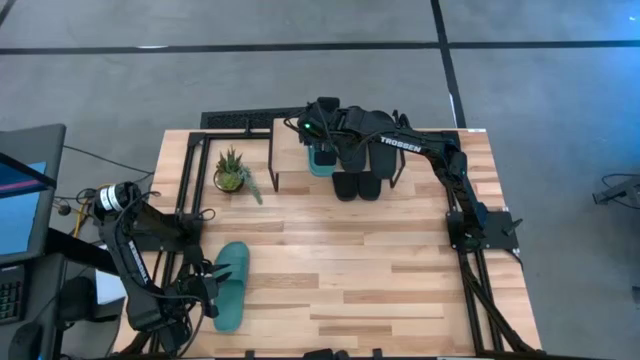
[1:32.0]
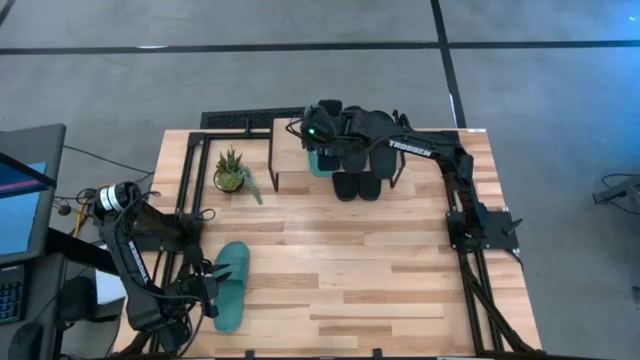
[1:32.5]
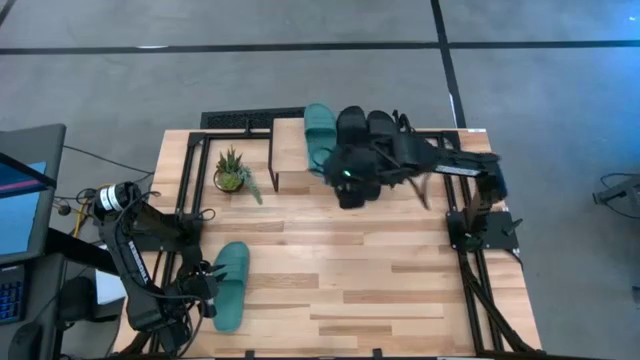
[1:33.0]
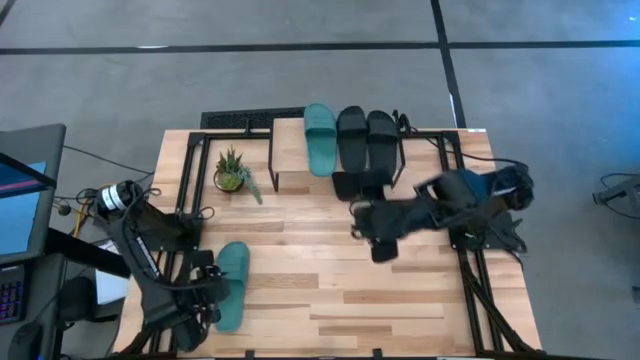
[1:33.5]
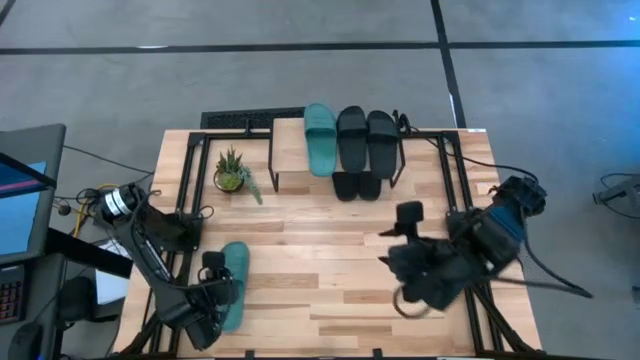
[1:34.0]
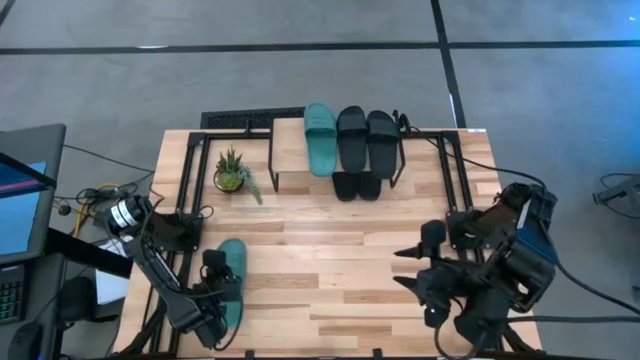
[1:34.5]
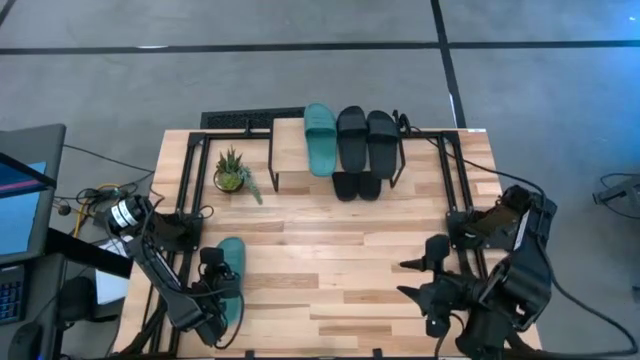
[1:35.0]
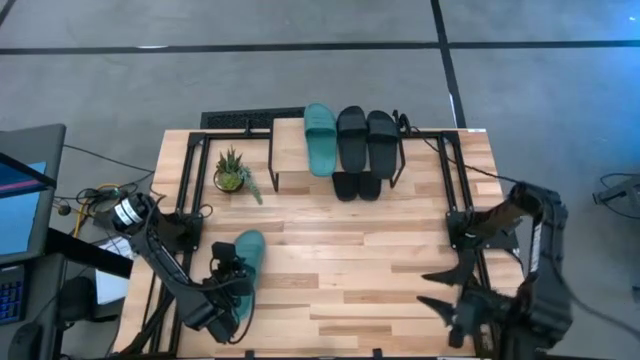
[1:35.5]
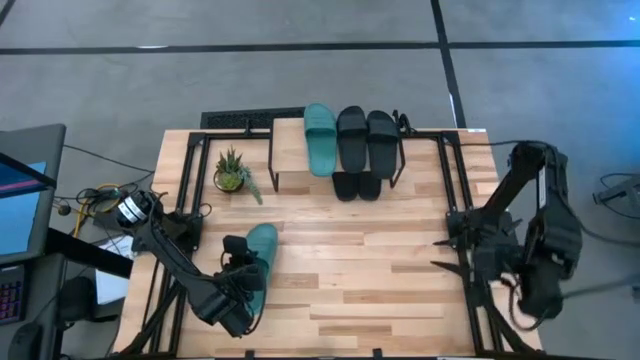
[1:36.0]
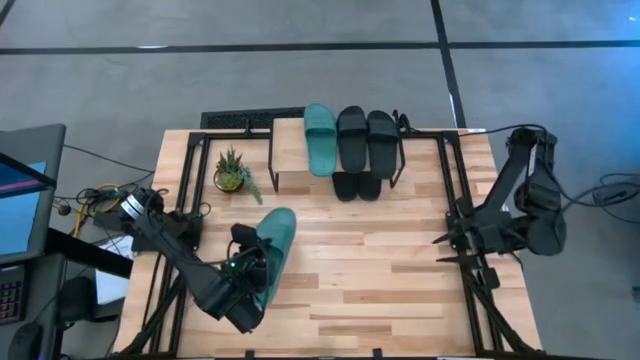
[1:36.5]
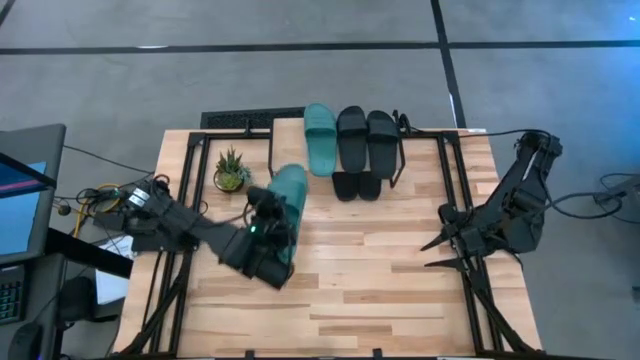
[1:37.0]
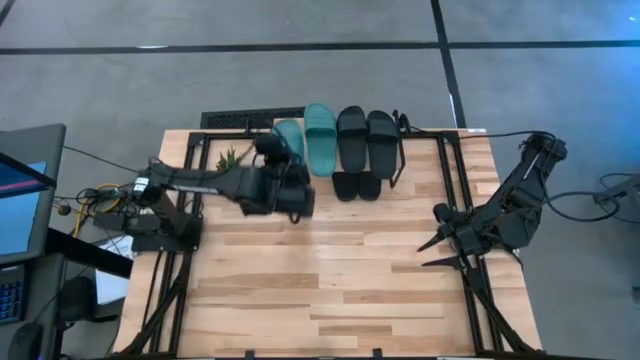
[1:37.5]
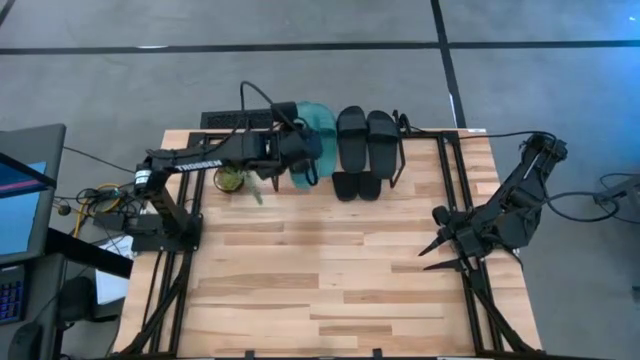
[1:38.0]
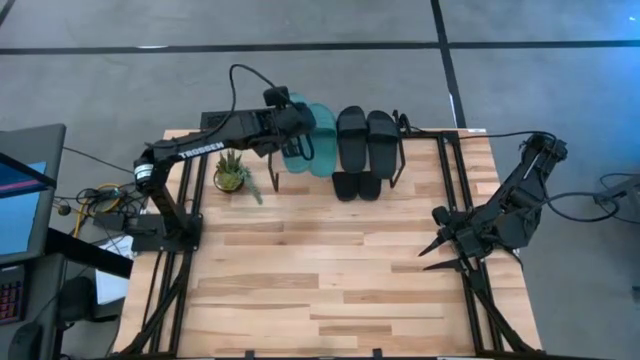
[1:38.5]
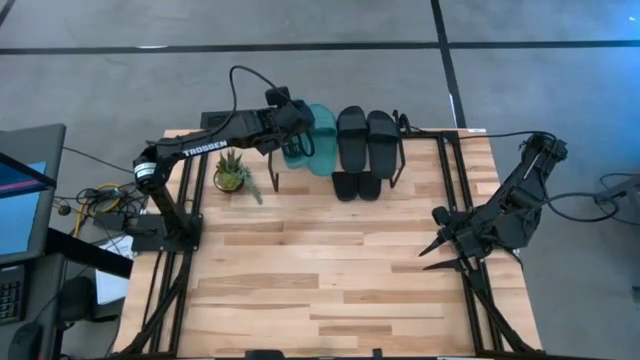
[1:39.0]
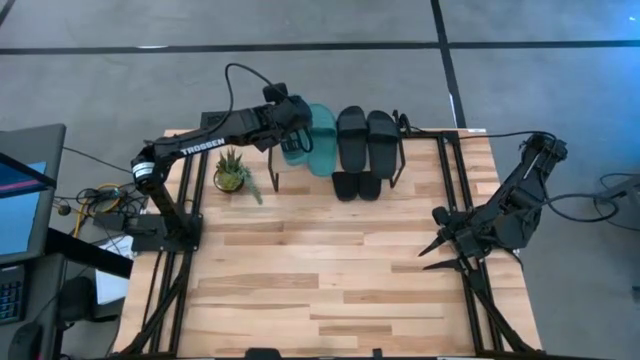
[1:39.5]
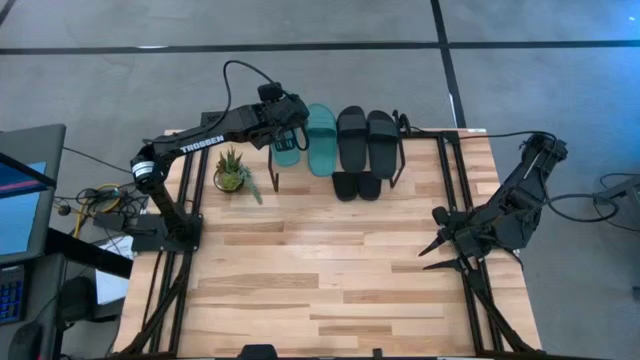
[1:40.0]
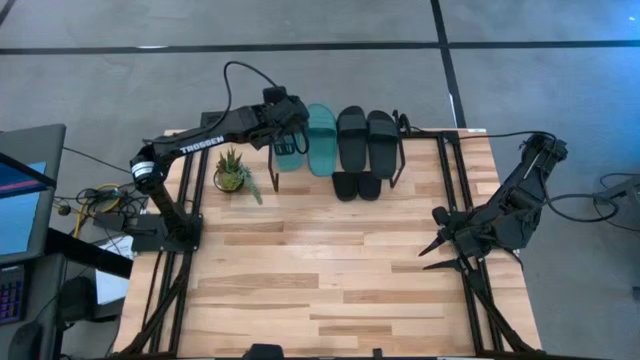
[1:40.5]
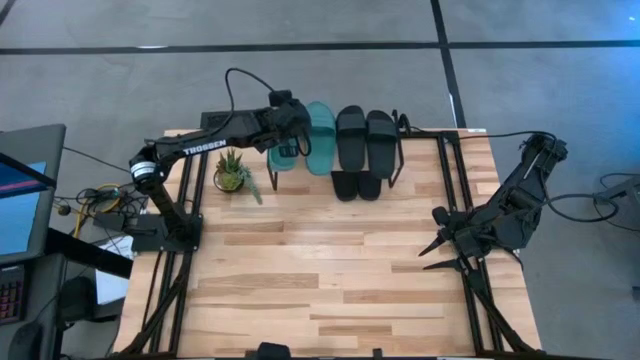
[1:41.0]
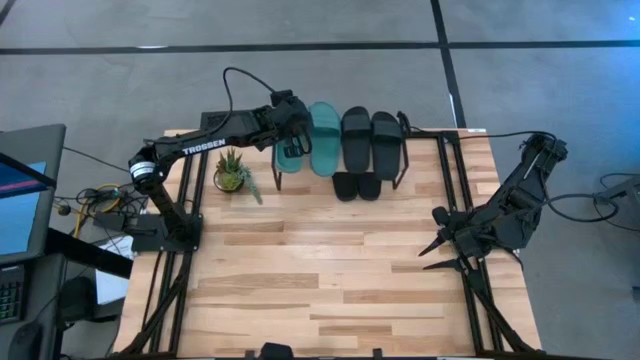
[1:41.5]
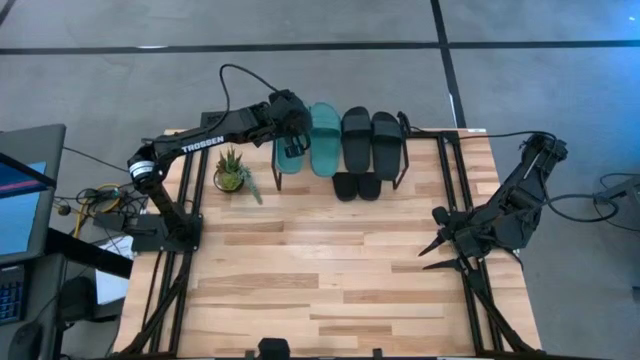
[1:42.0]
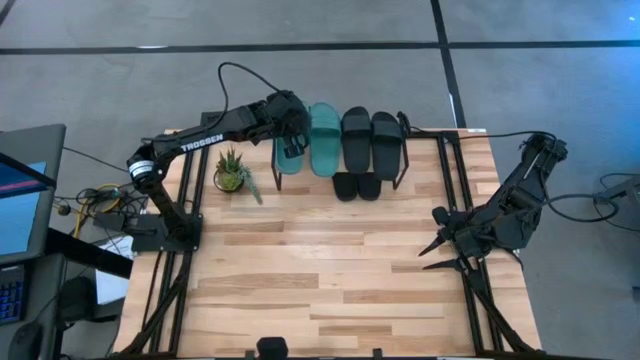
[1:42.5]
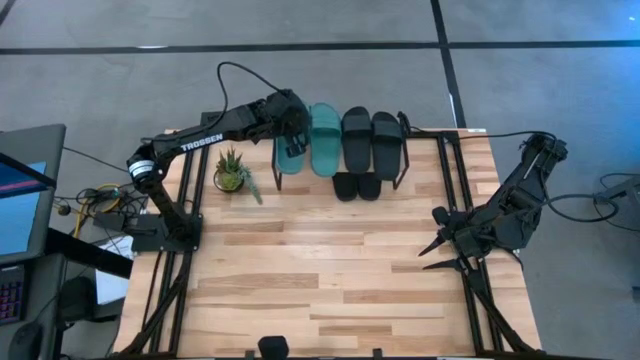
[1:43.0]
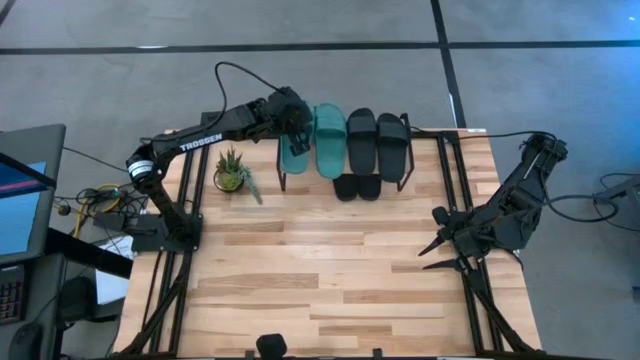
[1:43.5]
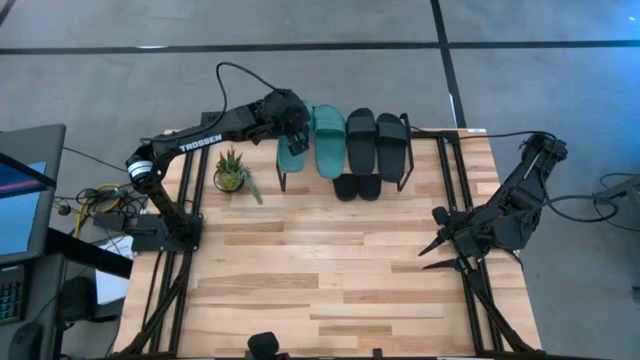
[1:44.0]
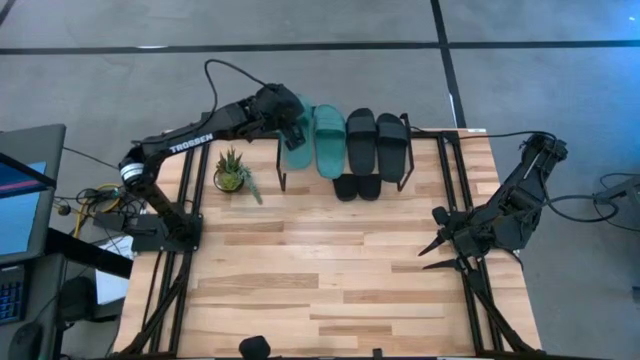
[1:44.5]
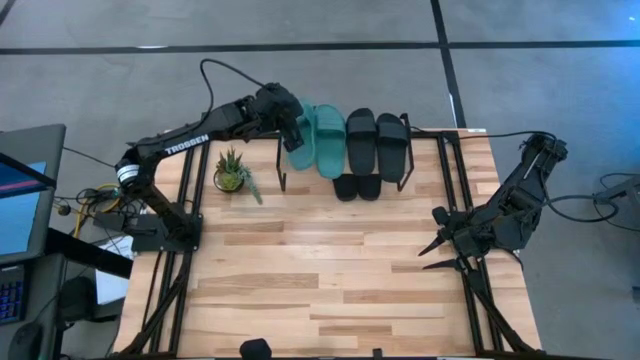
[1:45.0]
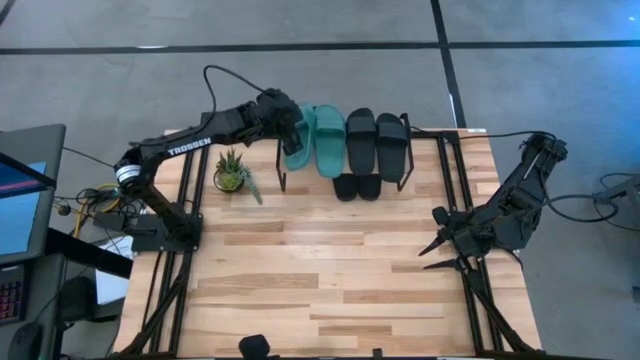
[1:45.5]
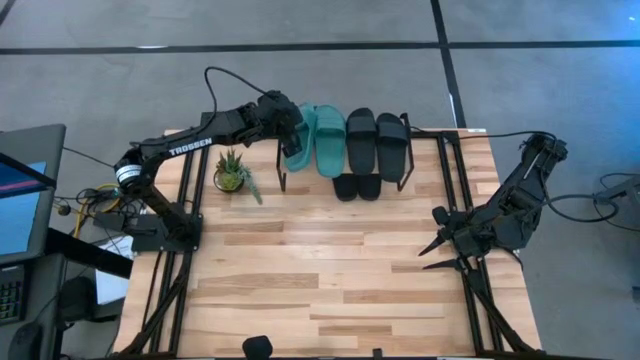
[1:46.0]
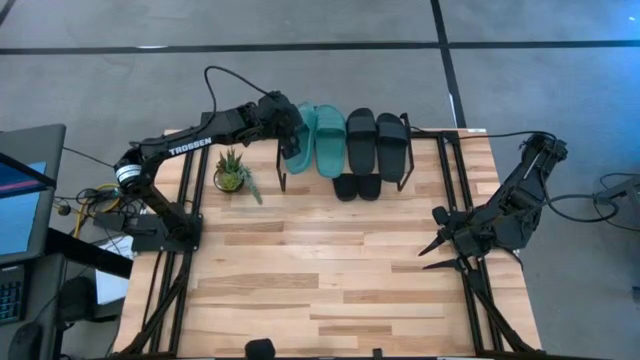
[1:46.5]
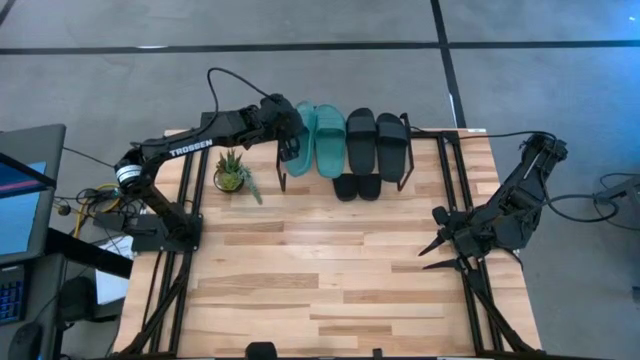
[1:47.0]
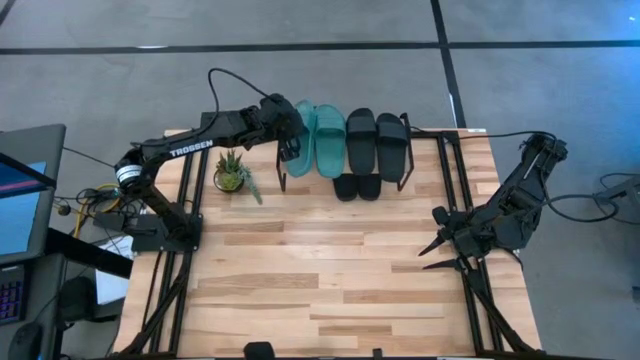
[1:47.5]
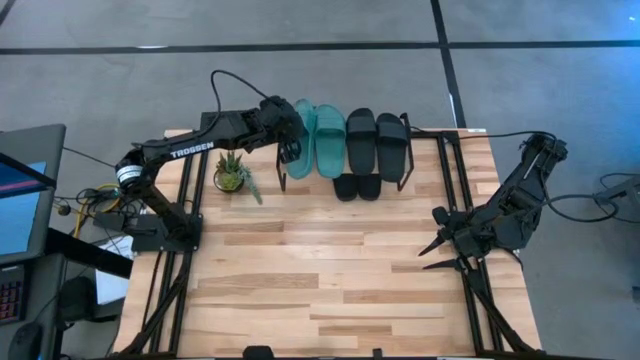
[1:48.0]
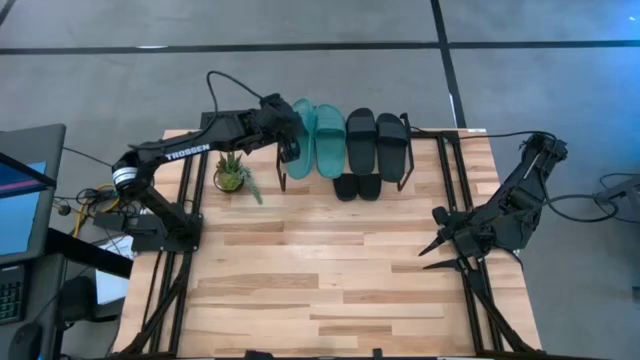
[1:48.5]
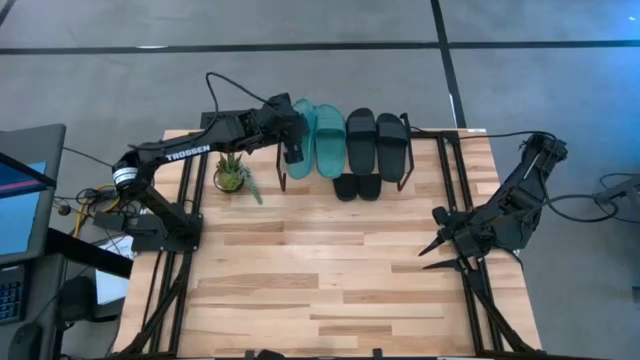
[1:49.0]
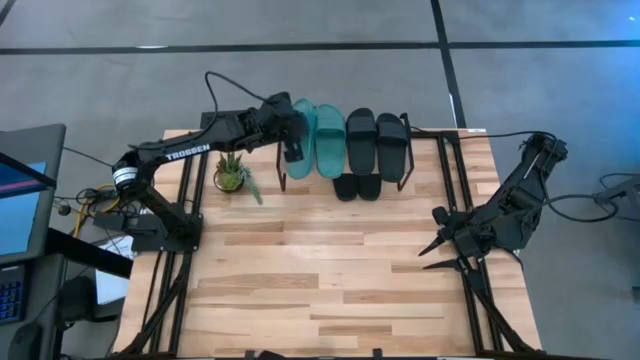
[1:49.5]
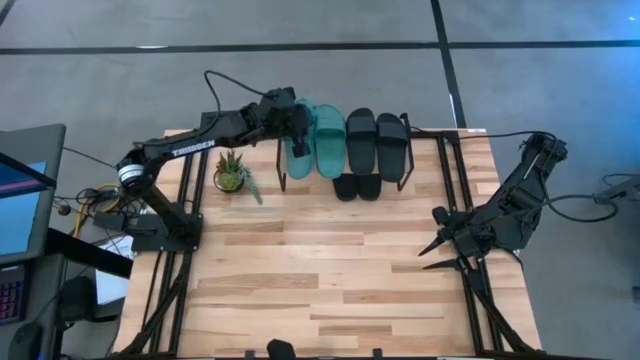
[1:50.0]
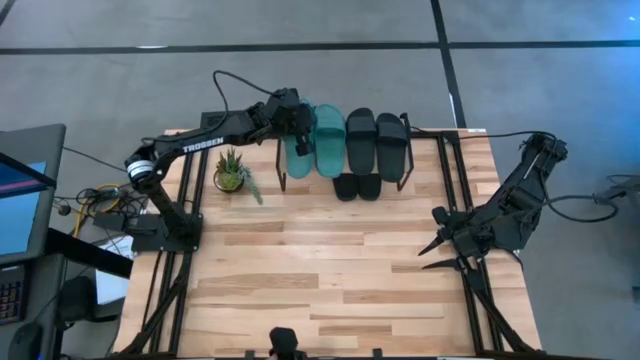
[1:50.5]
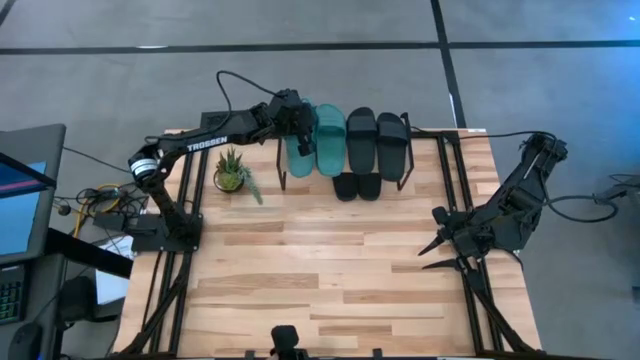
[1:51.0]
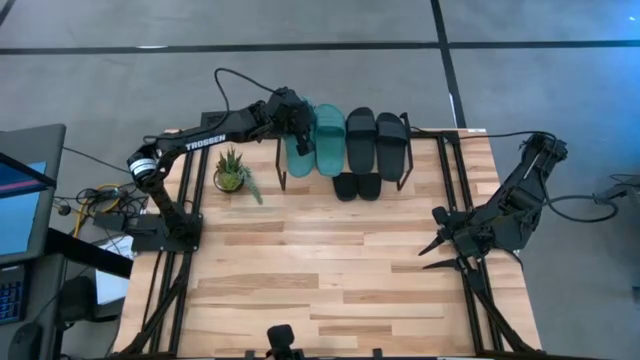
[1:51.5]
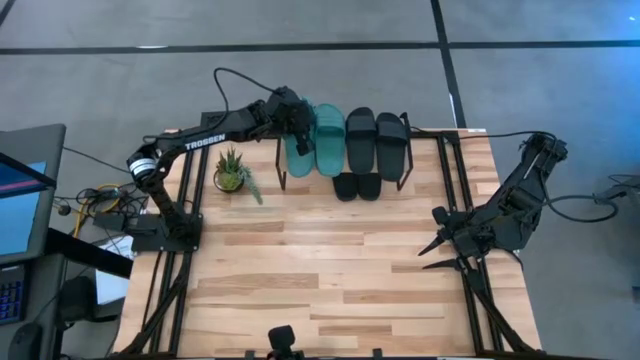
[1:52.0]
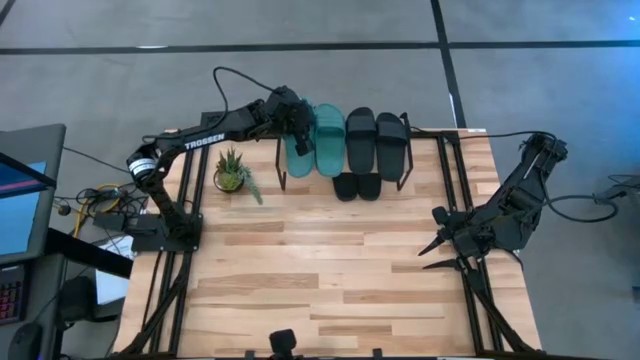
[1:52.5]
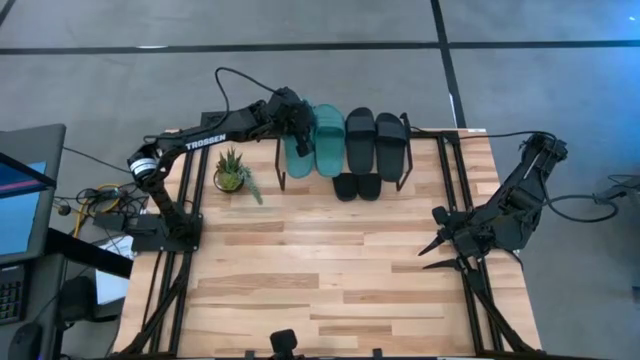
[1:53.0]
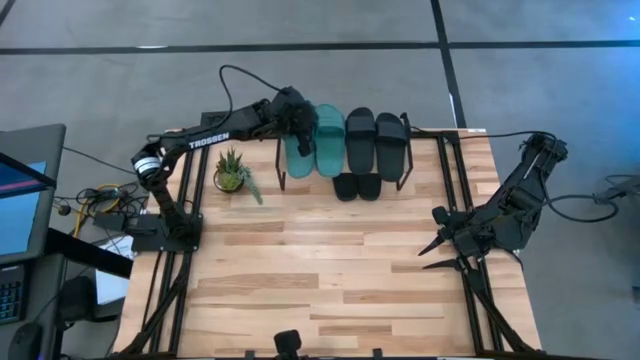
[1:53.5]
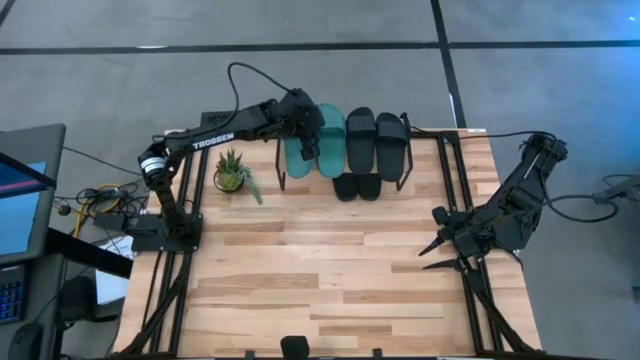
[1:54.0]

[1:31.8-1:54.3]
Task: Pick and place slides into the shelf
Put the green slipper on the shelf

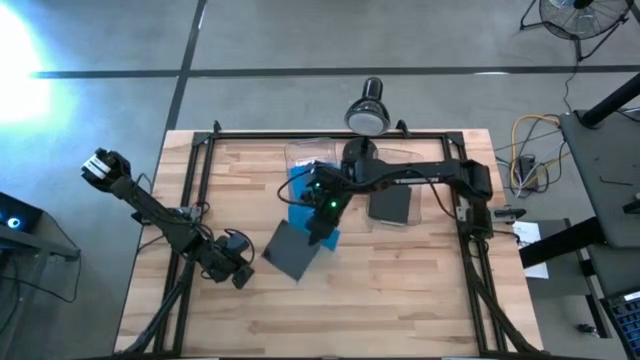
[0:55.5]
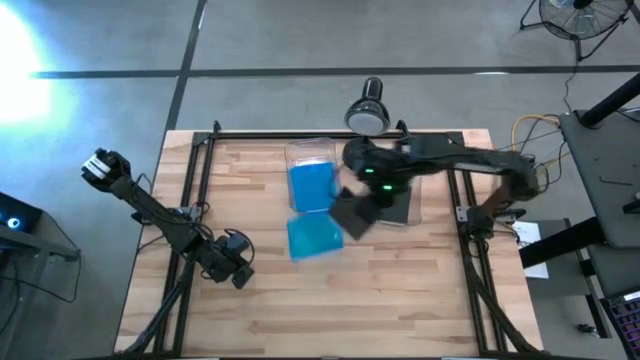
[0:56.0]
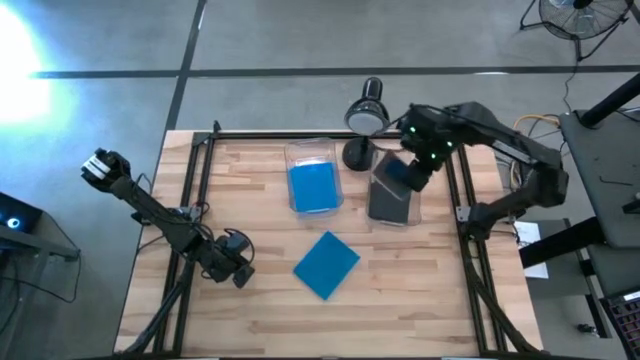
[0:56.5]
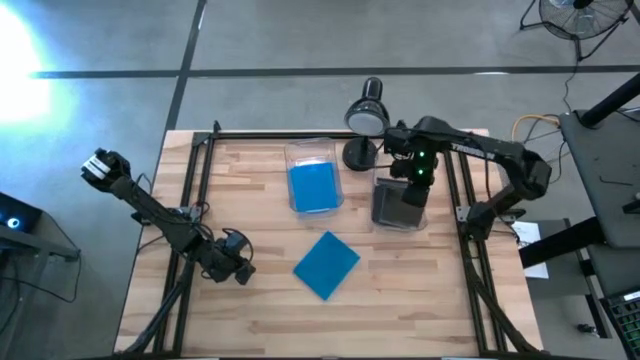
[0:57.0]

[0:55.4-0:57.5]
Task: Pick & place jewel cases by type
Put the black CD case into the right transparent bin
